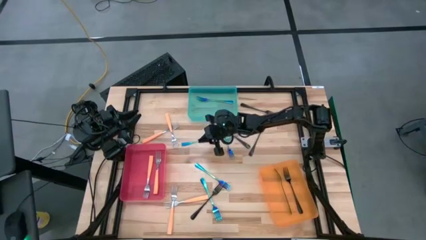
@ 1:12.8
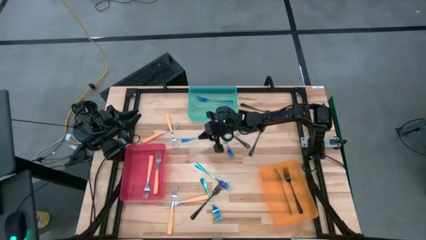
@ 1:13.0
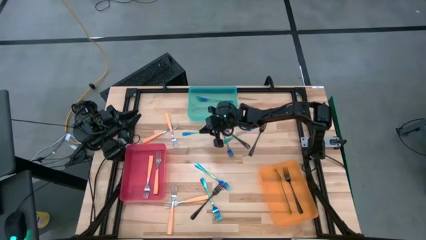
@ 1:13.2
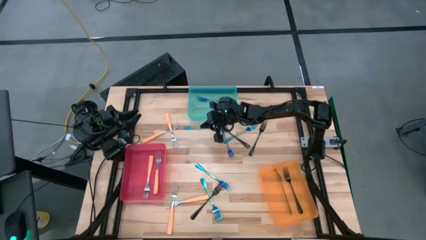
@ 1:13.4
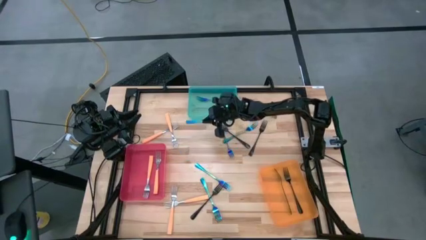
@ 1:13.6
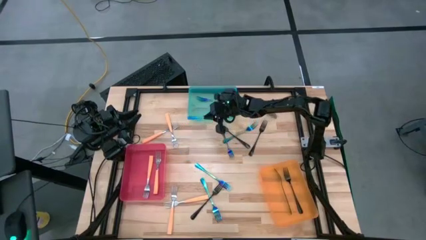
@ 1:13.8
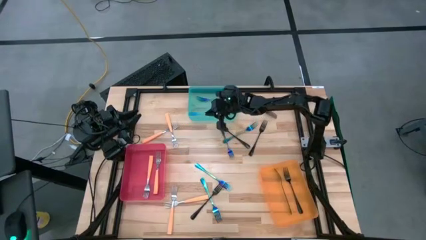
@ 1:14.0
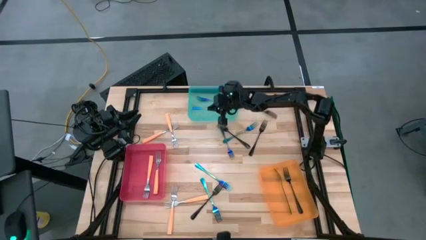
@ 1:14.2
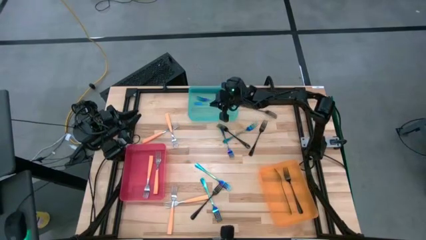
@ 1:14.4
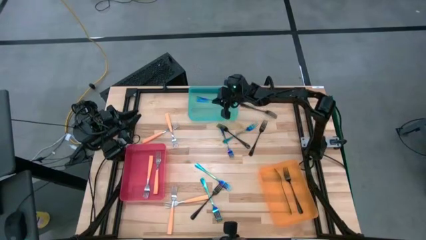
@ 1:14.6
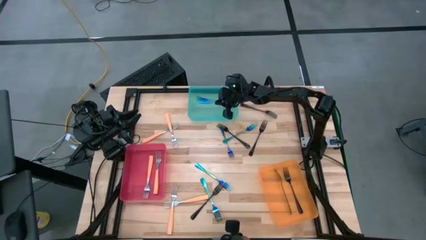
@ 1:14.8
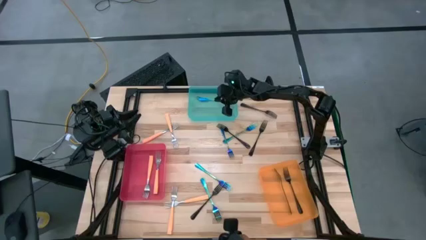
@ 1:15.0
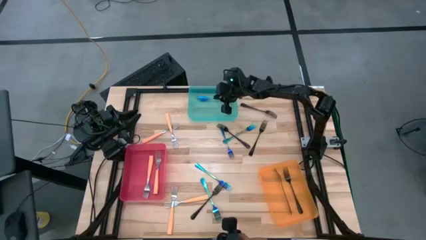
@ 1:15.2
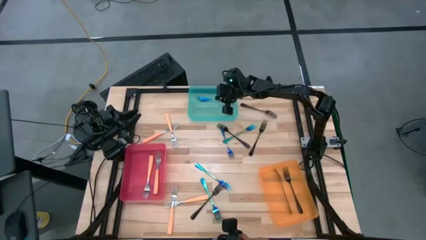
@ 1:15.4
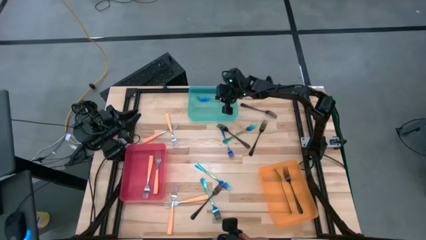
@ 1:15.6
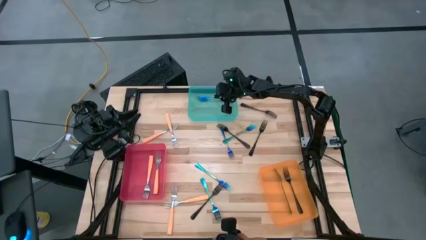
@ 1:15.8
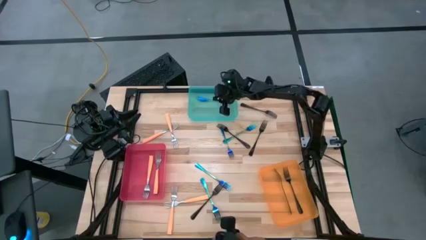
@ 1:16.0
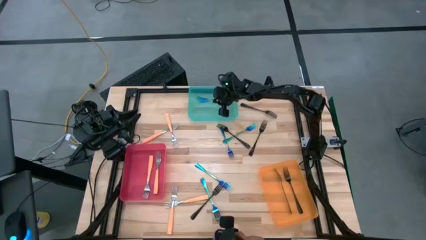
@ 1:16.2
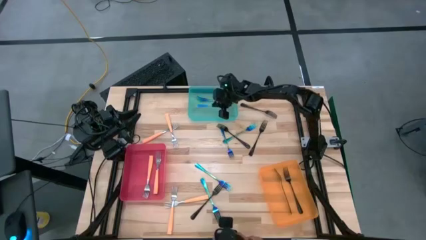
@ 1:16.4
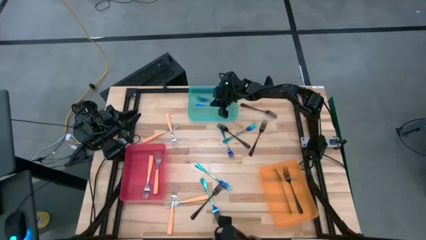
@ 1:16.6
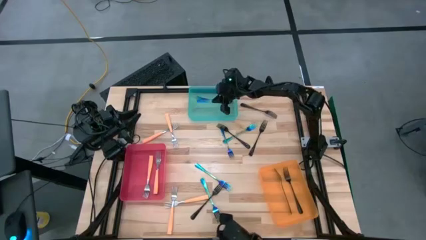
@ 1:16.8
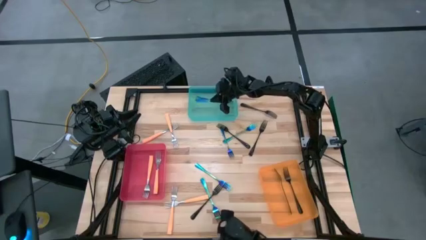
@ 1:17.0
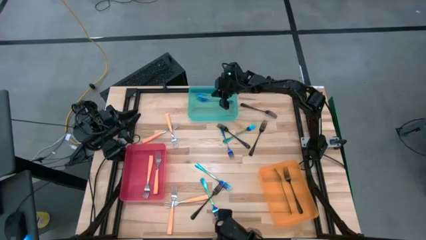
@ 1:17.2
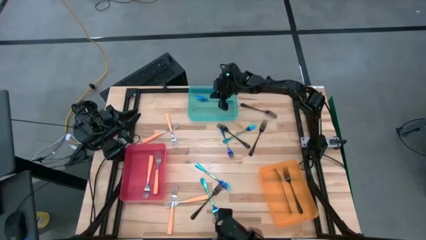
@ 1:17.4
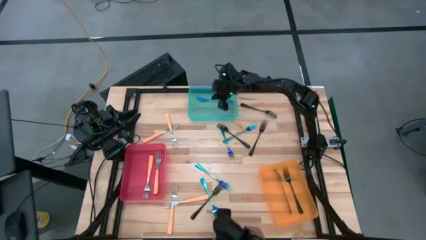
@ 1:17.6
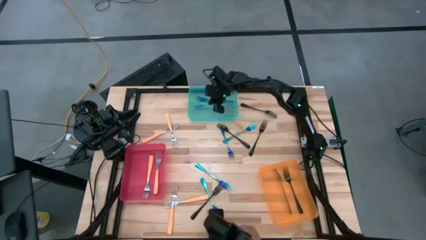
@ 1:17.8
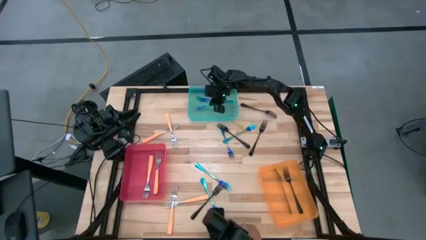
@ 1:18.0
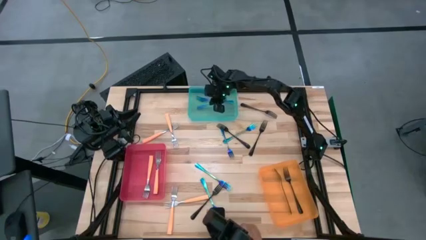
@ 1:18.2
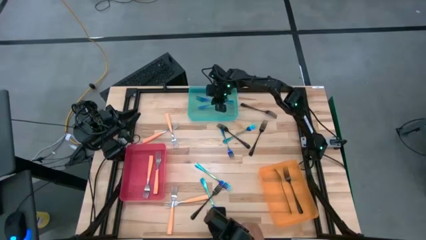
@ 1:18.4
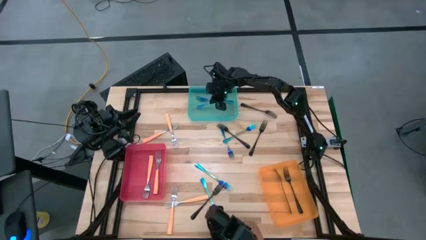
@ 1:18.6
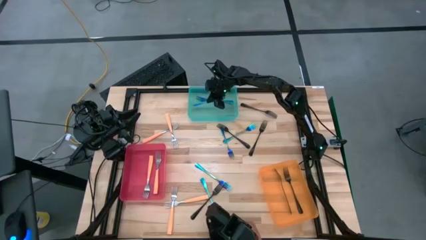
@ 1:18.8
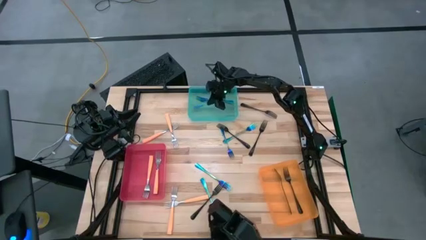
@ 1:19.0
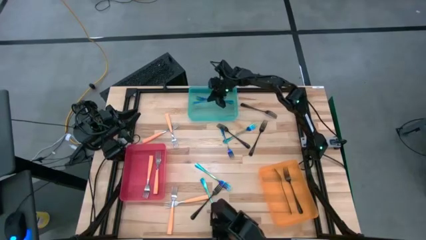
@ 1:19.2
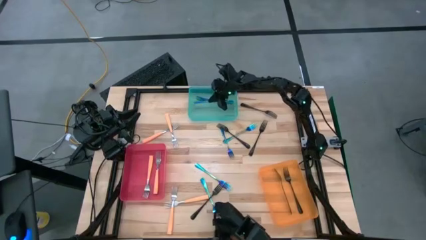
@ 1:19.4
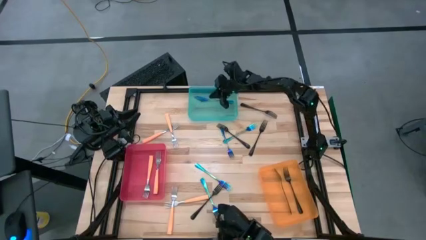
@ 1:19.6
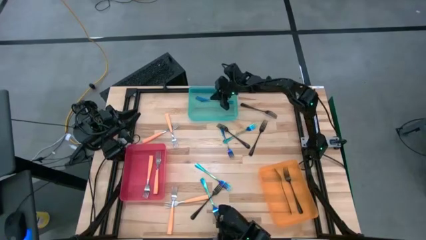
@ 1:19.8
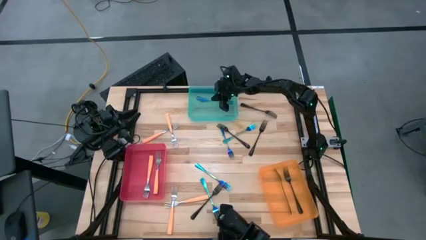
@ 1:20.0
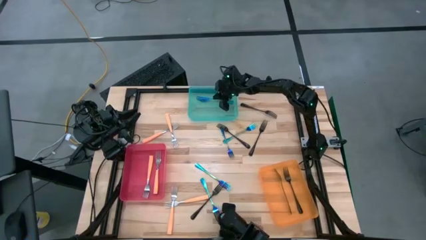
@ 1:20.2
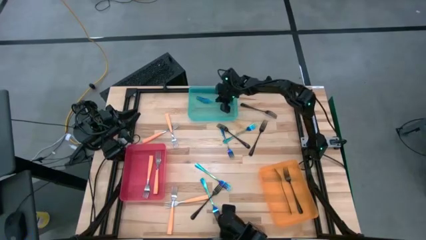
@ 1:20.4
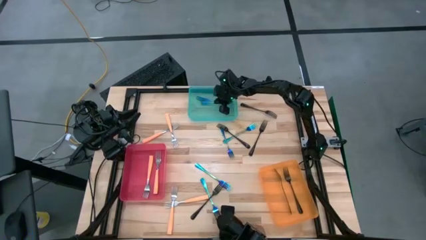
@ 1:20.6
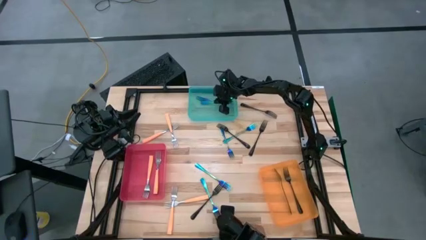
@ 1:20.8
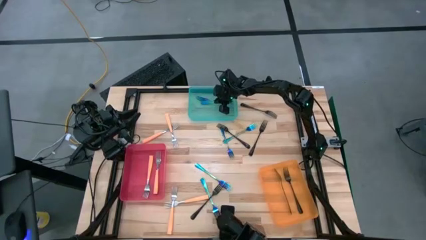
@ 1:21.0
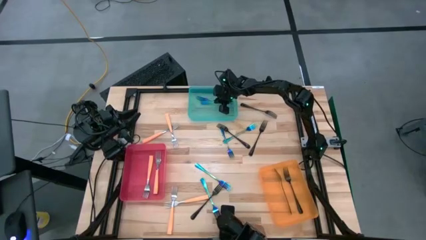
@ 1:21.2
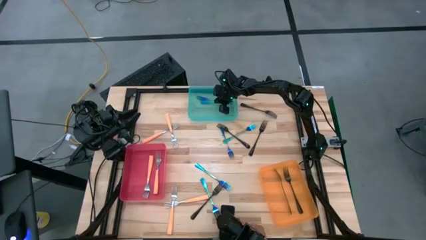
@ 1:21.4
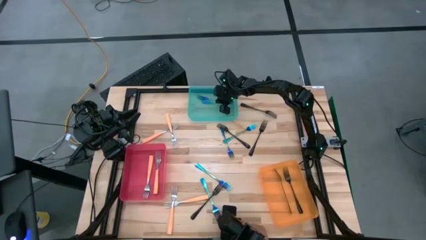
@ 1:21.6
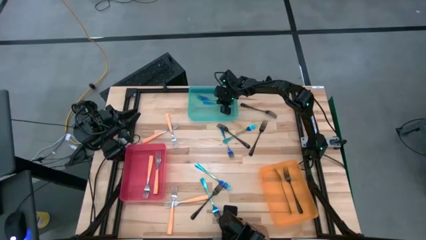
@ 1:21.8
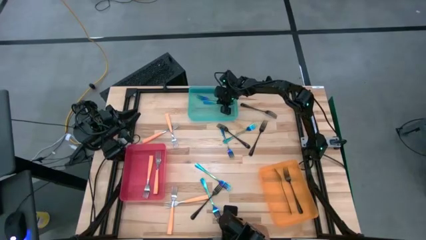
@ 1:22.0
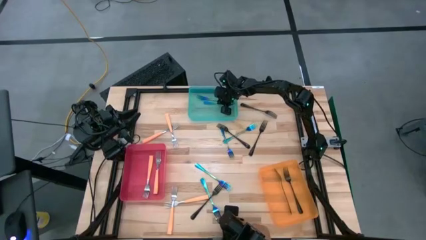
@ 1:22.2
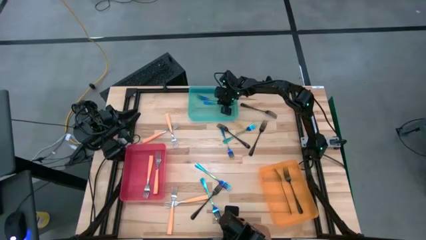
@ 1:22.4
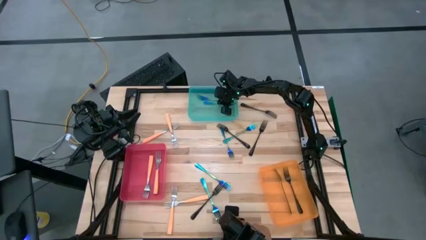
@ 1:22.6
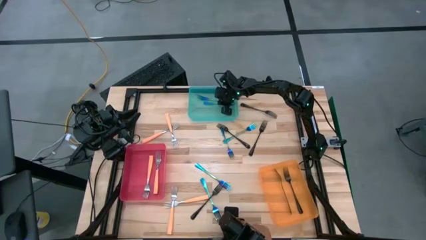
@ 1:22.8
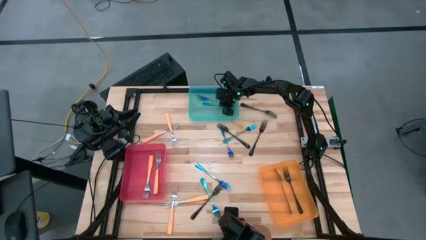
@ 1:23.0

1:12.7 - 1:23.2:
Task: Sort silverware by color (type)
Put the blue fork into the blue bin

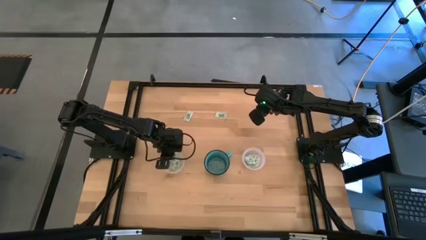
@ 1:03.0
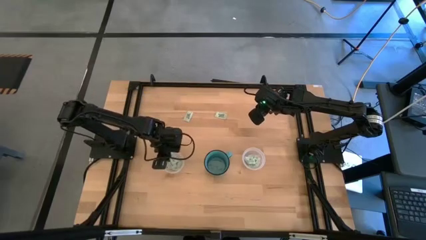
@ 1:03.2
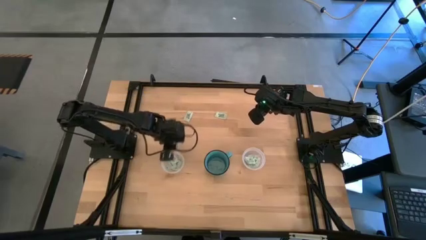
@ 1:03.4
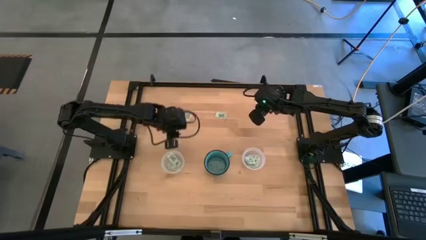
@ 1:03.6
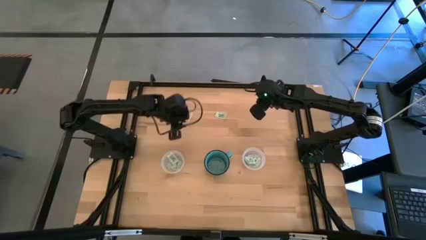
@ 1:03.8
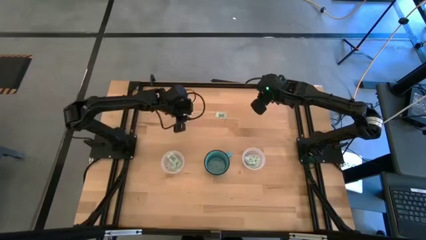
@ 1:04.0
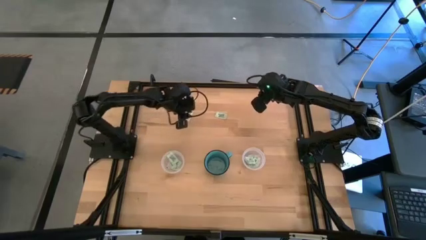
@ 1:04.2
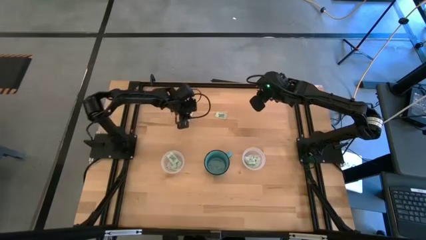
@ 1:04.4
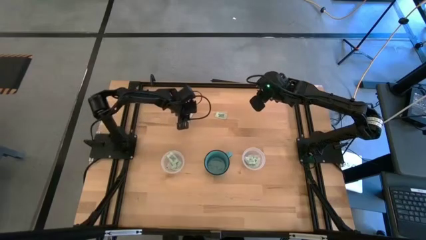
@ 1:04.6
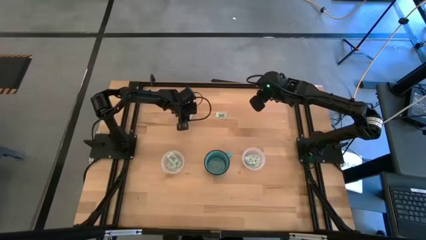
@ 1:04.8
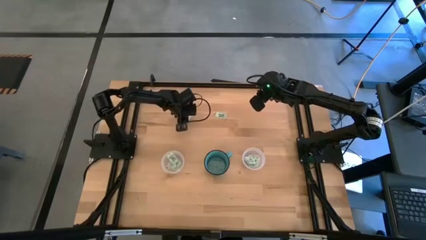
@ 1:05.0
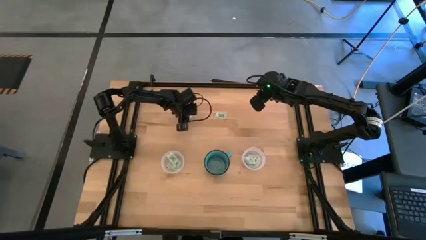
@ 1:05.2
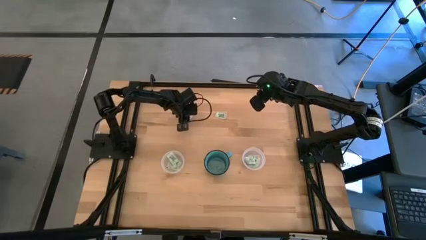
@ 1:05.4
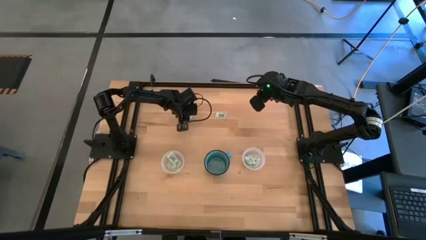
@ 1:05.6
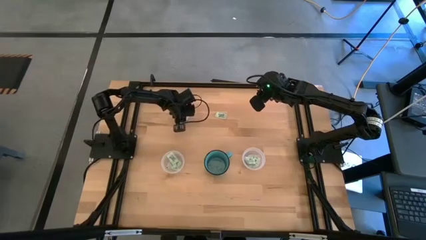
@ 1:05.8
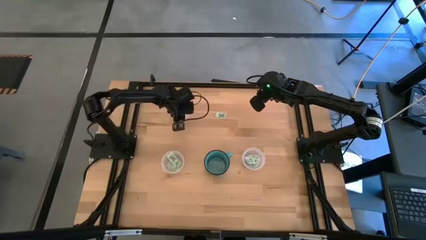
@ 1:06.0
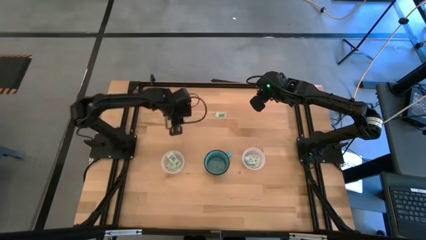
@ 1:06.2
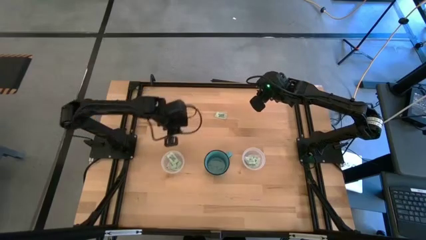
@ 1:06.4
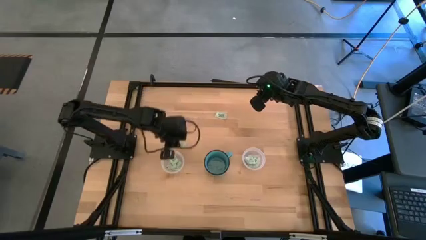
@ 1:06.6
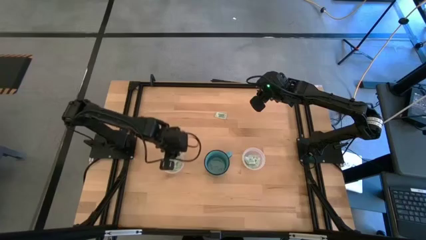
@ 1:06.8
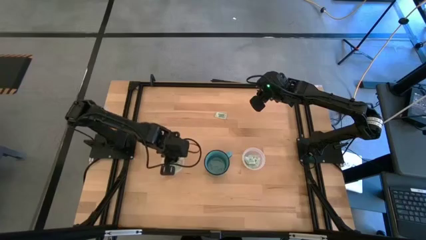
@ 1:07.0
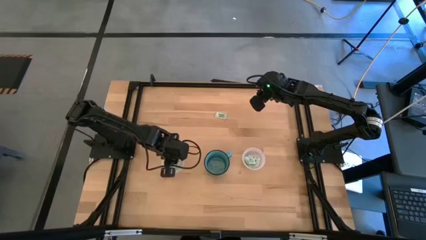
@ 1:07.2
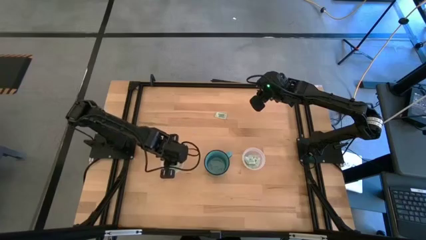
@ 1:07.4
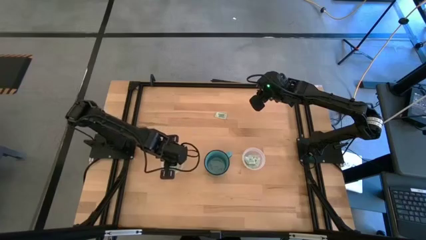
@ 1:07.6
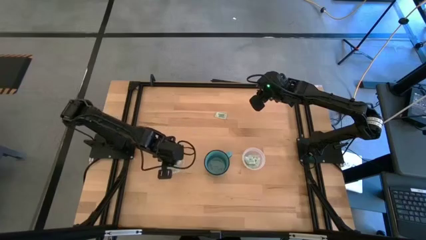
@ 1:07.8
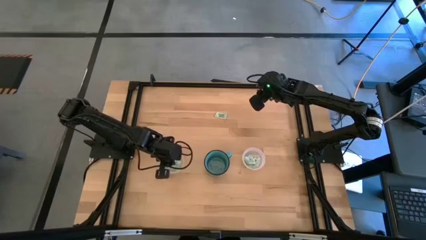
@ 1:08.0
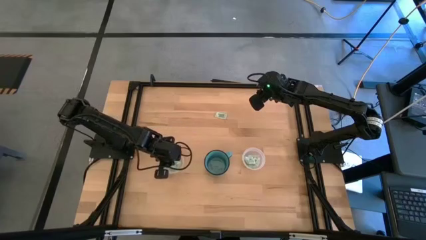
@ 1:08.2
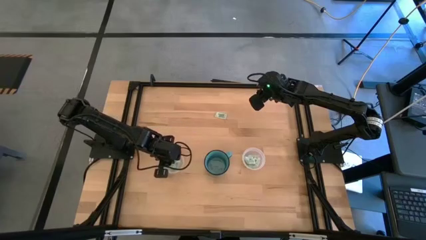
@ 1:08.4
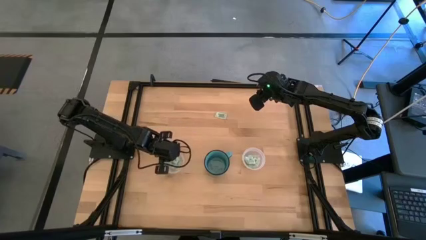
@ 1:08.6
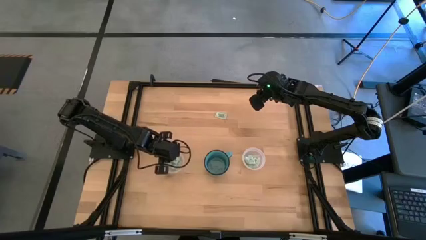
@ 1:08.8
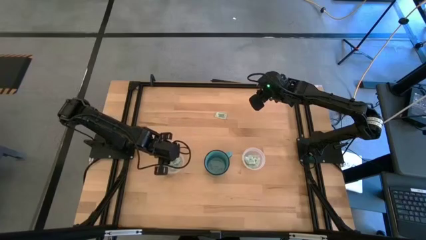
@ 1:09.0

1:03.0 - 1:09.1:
Task: Pick and place Stevia / Truvia into bins
Put the green stevia packet into the left transparent container
